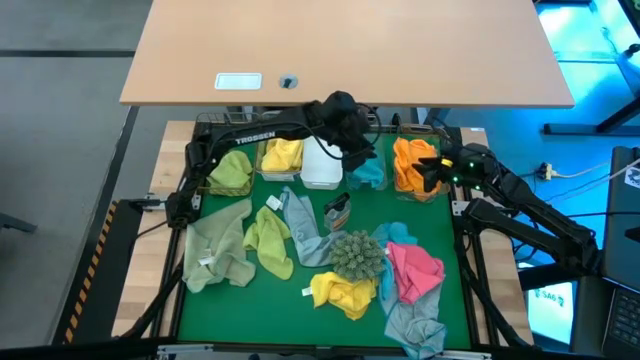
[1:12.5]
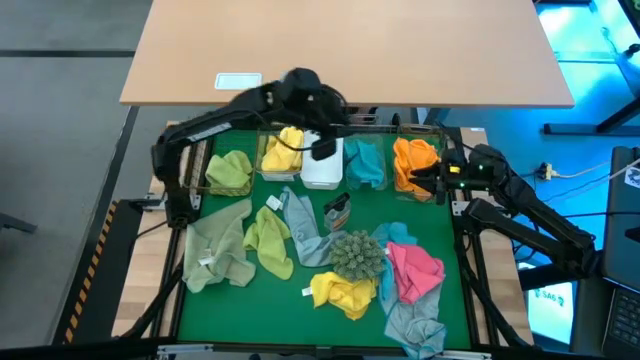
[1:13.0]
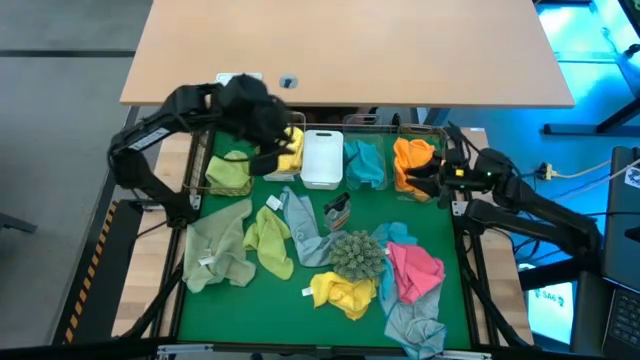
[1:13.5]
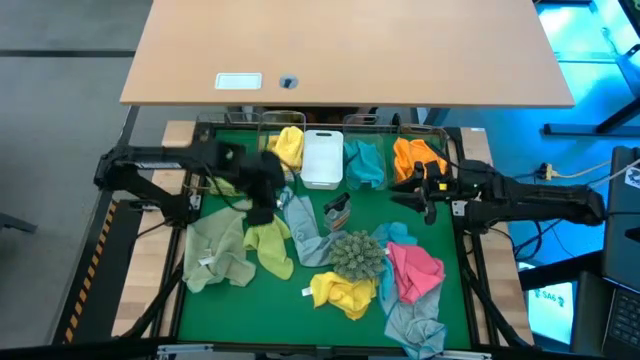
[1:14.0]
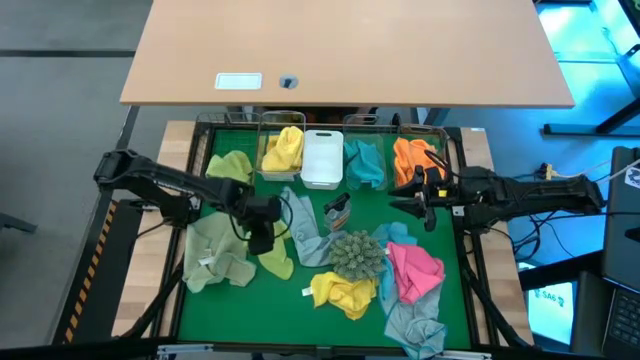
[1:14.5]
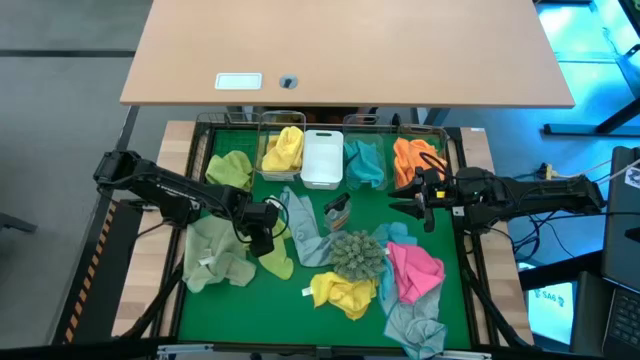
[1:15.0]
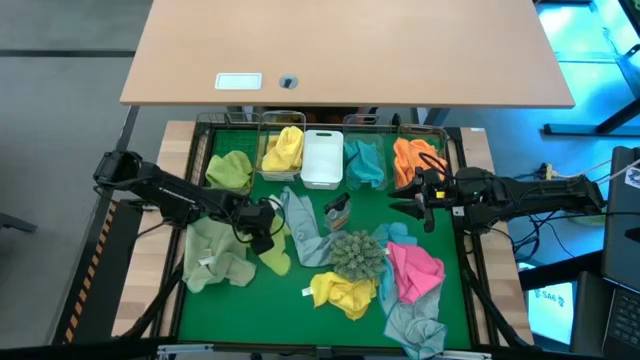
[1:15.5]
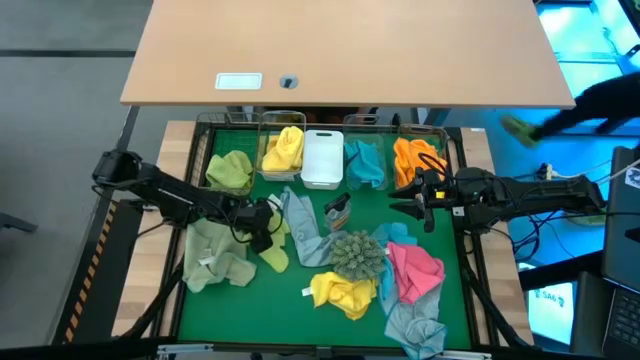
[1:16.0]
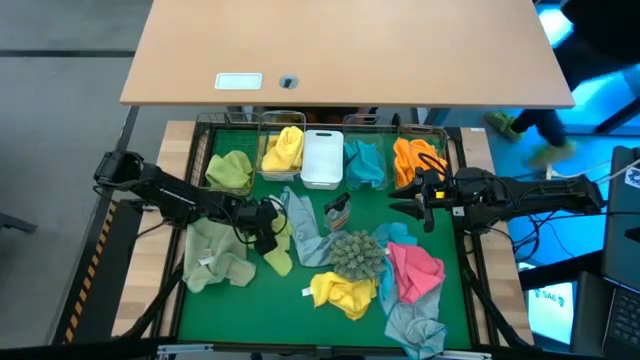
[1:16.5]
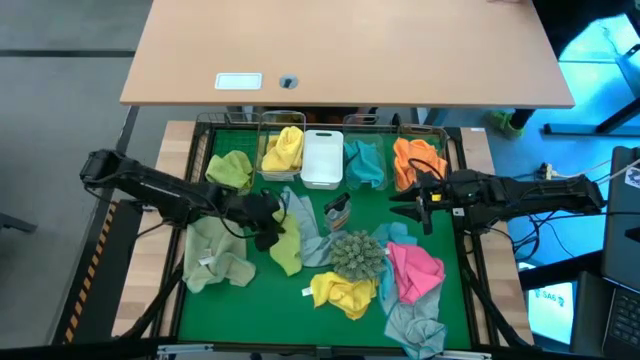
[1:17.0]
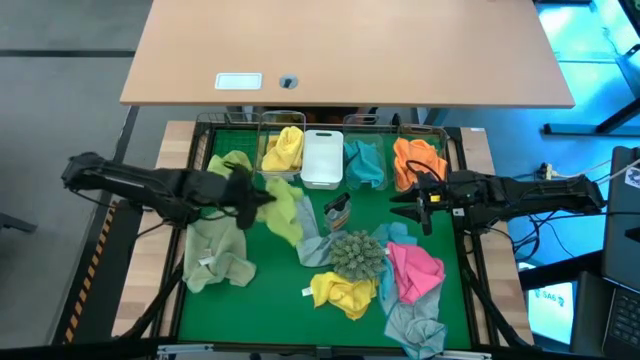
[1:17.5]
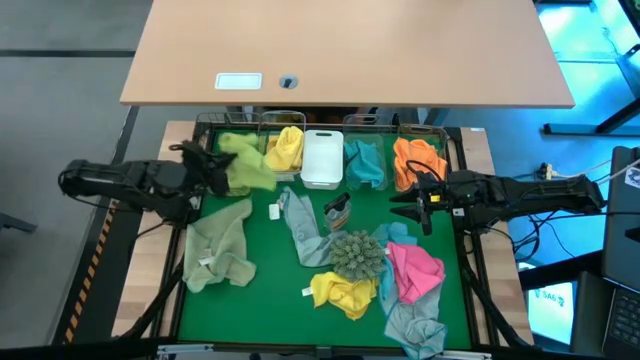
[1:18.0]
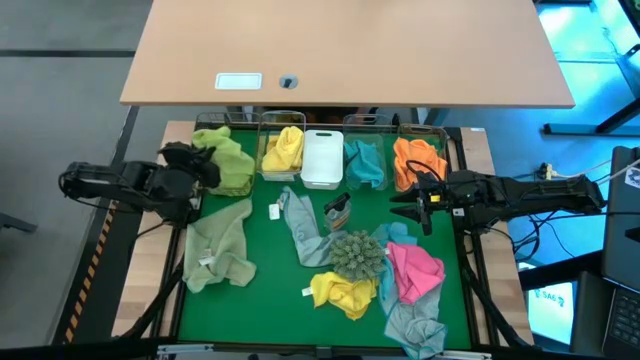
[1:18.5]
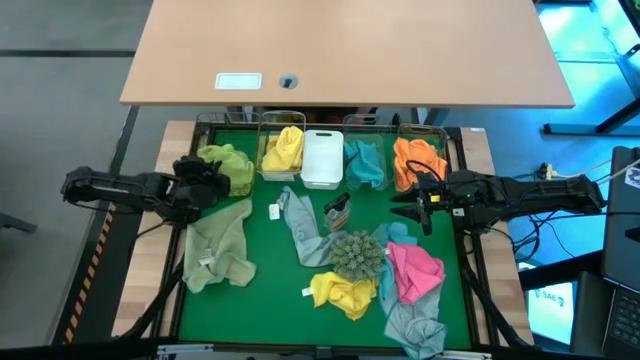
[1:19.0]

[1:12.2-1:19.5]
Task: Sort microfiber towel by color & place in baskets
Put the green microfiber towel into the gold wire basket

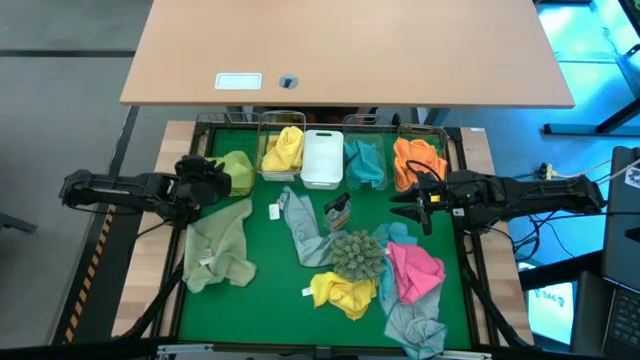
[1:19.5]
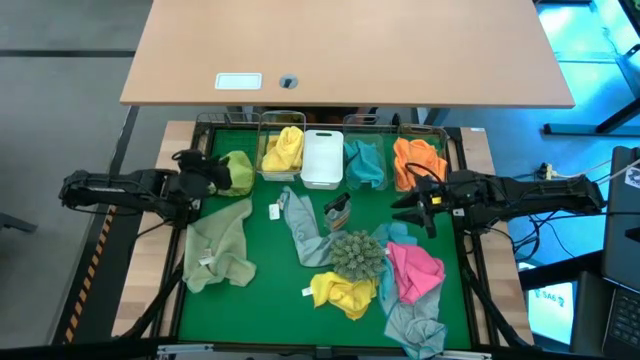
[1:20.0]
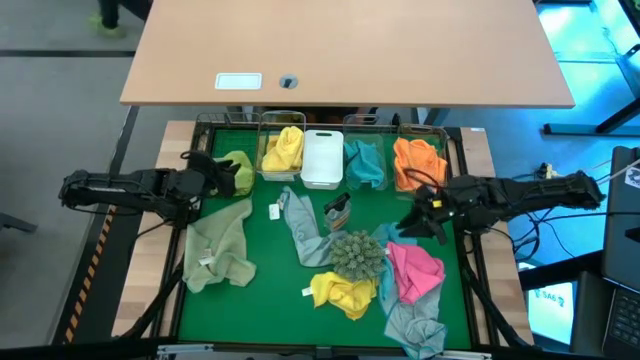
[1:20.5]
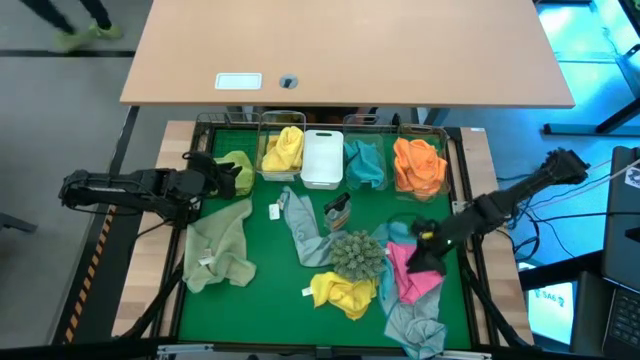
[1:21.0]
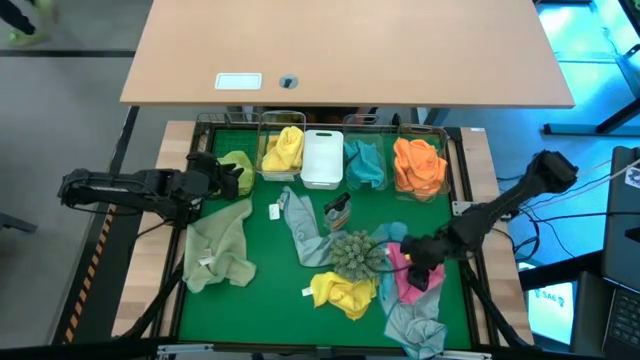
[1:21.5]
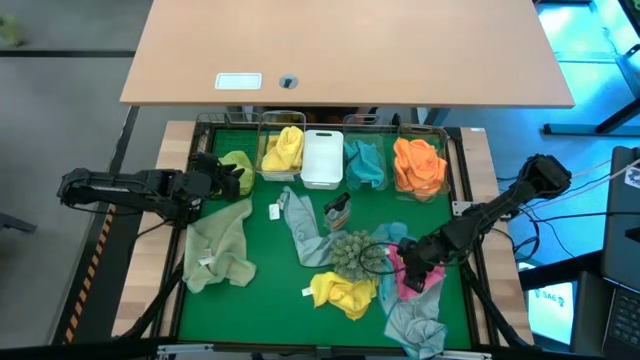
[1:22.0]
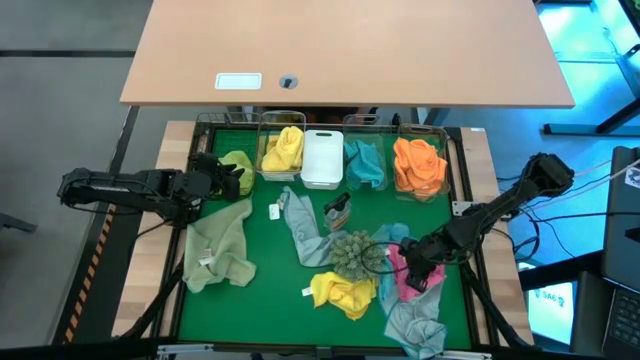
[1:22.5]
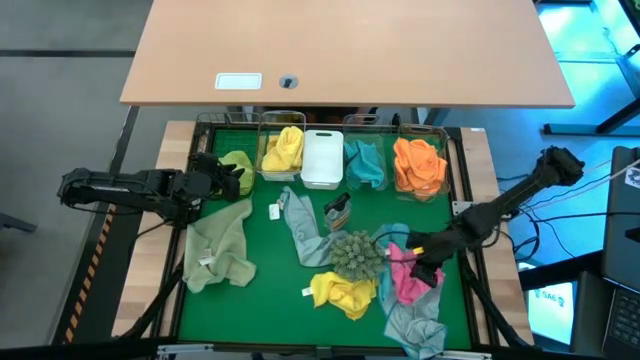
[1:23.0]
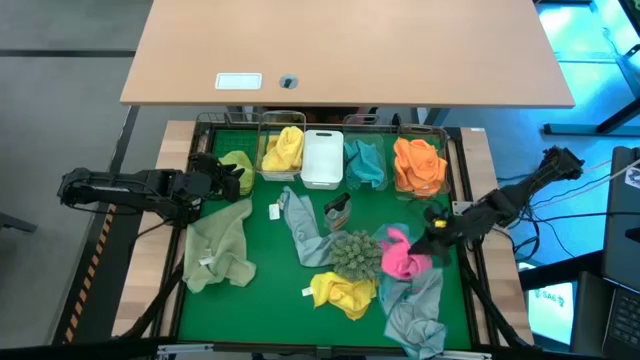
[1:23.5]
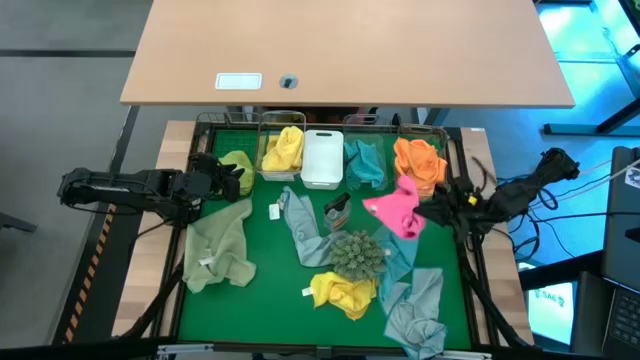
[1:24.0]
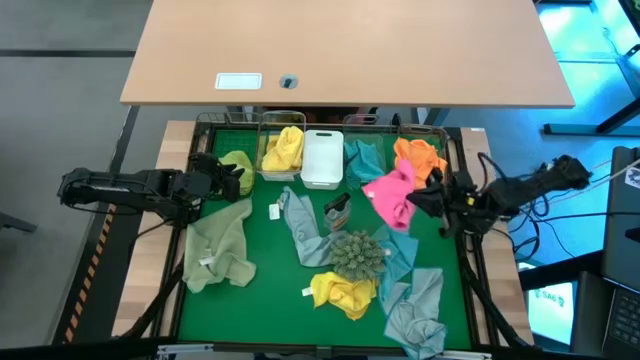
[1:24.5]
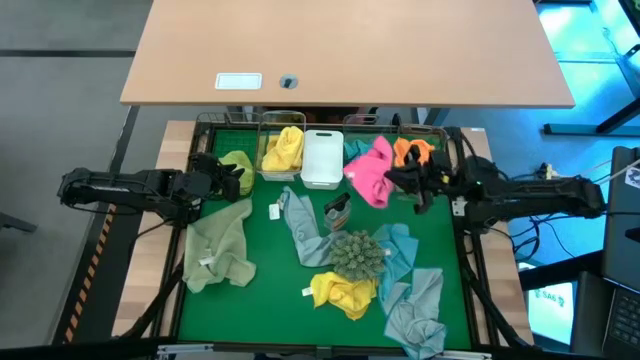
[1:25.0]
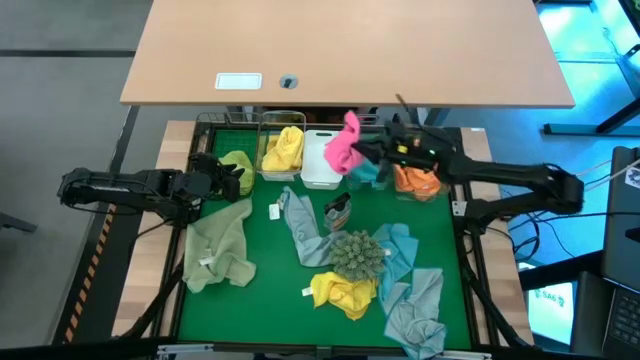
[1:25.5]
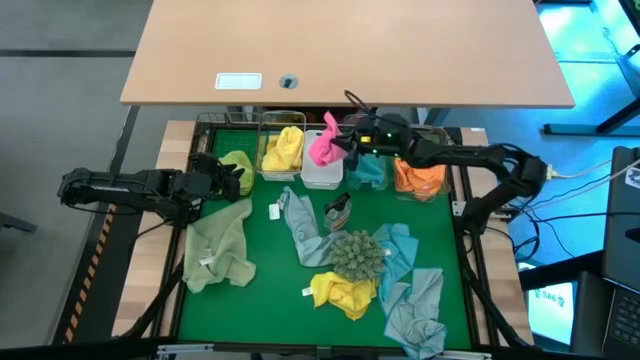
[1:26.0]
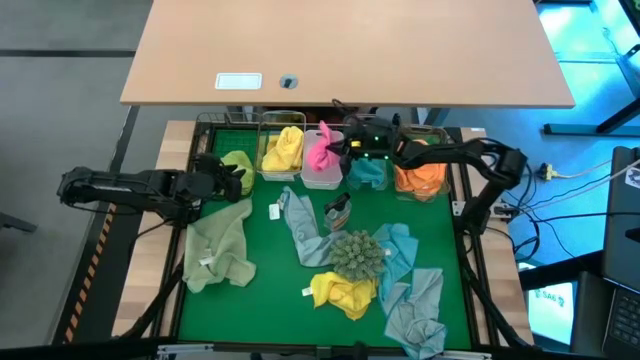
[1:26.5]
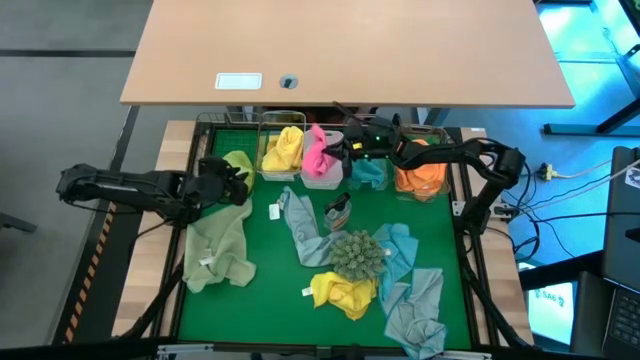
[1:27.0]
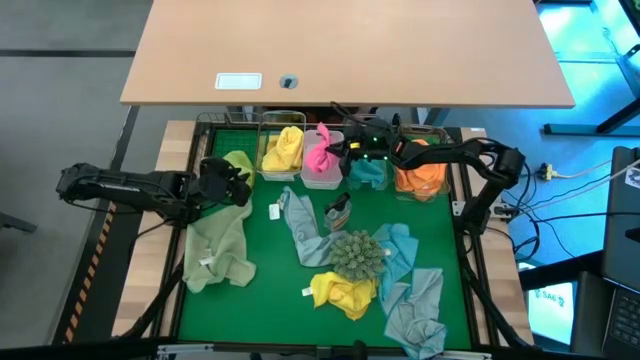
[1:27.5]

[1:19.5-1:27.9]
Put the pink microfiber towel into the white bin

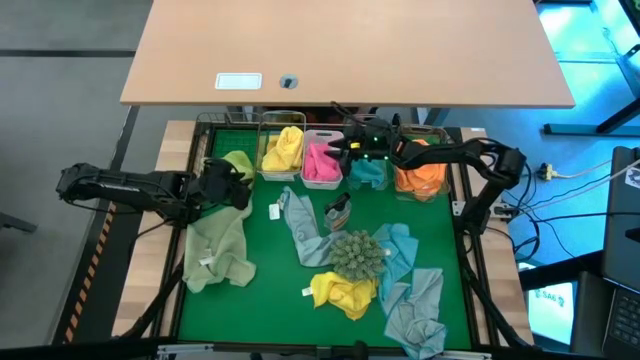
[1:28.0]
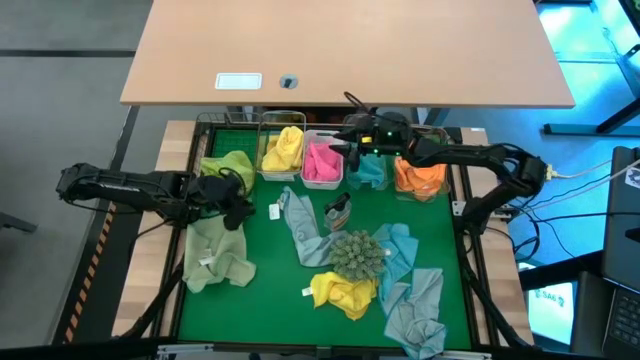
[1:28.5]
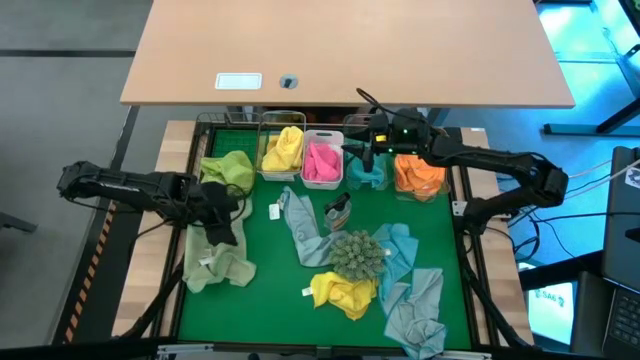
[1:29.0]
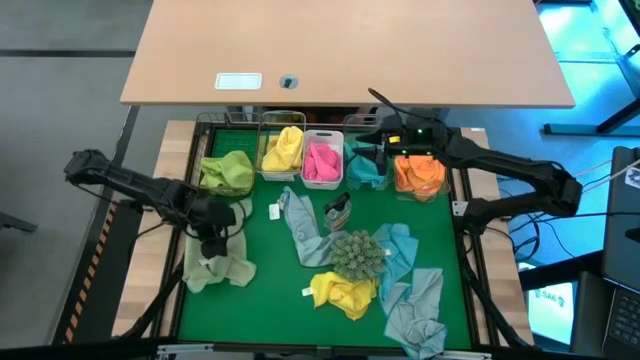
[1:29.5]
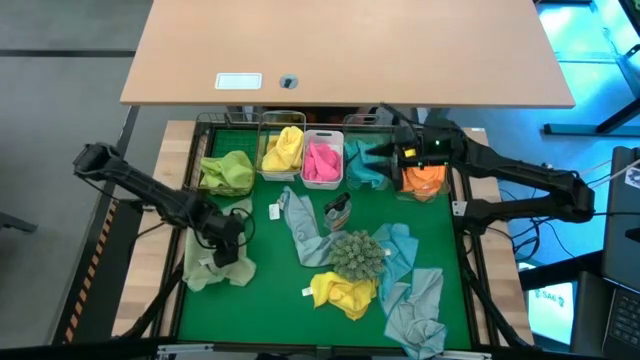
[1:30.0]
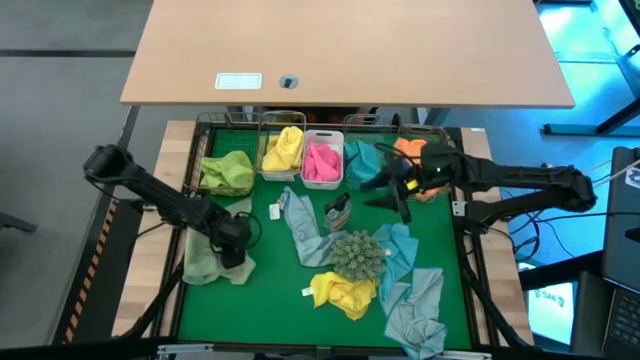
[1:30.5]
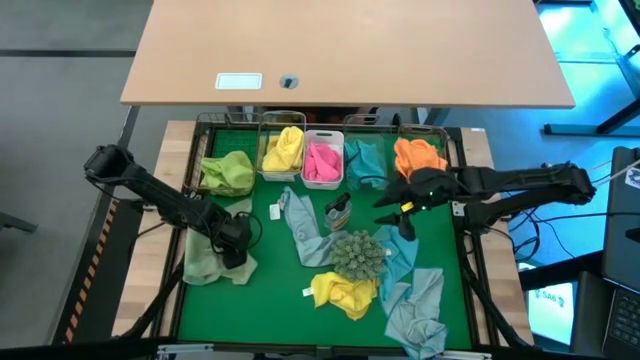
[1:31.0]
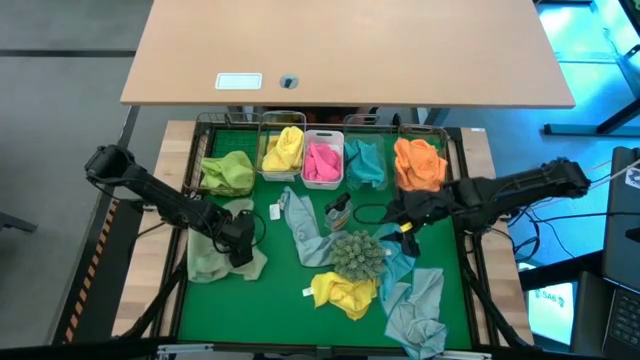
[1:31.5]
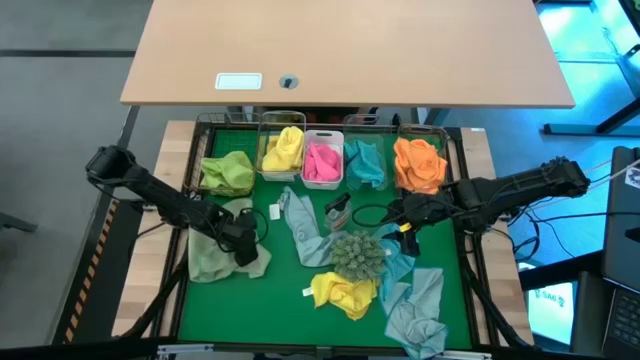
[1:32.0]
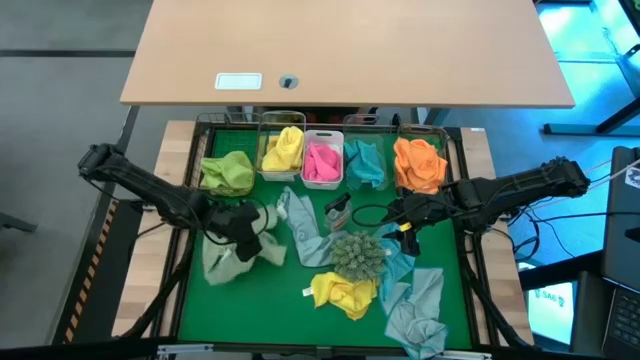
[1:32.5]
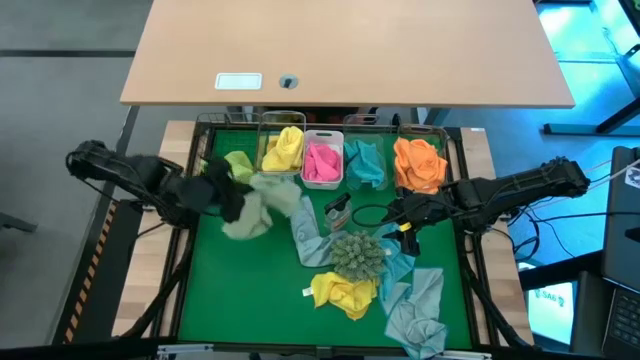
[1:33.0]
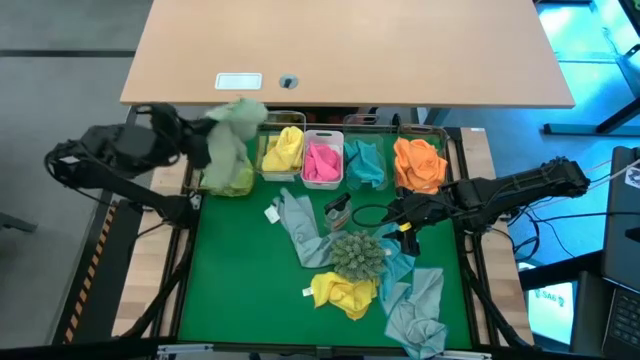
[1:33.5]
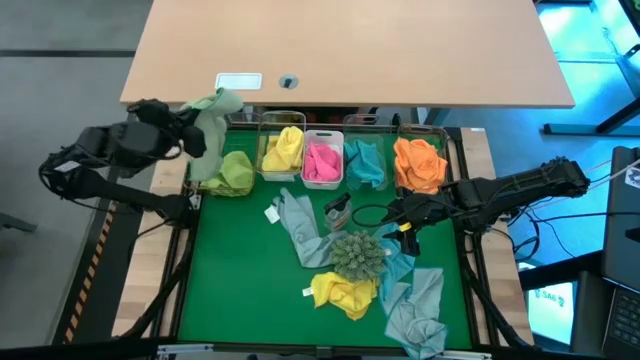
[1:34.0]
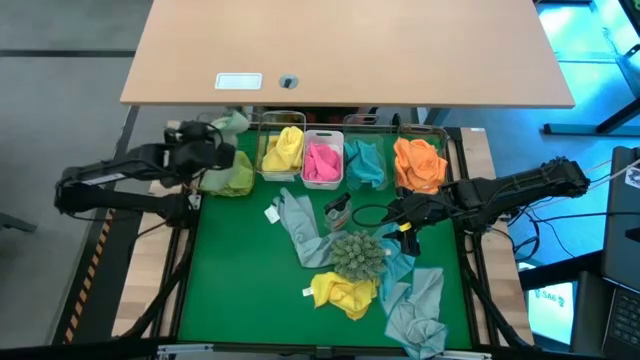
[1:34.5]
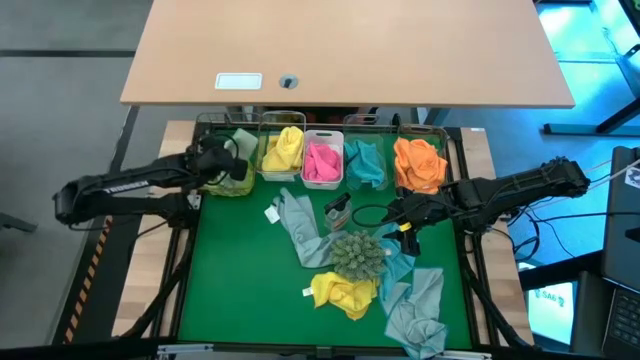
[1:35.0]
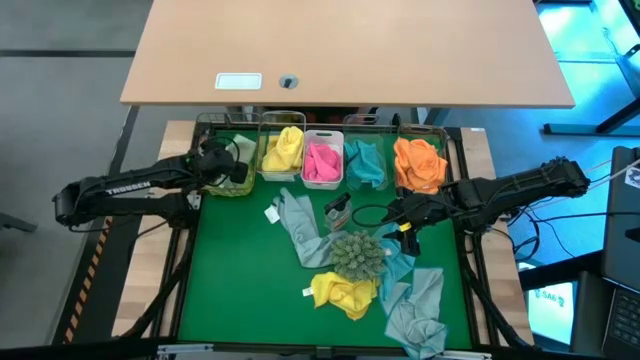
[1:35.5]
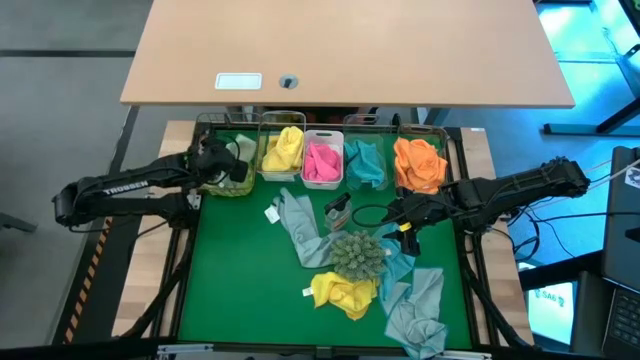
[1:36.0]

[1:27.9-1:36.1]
Put the light green microfiber towel into the gold wire basket
